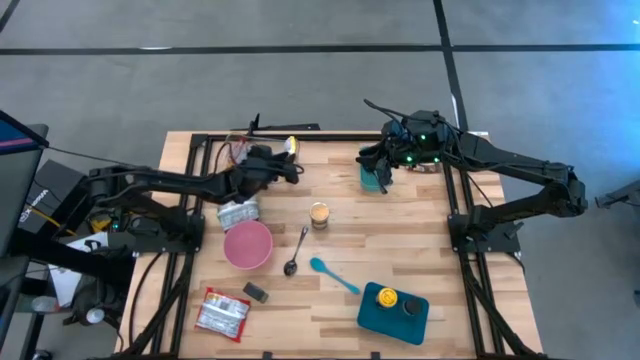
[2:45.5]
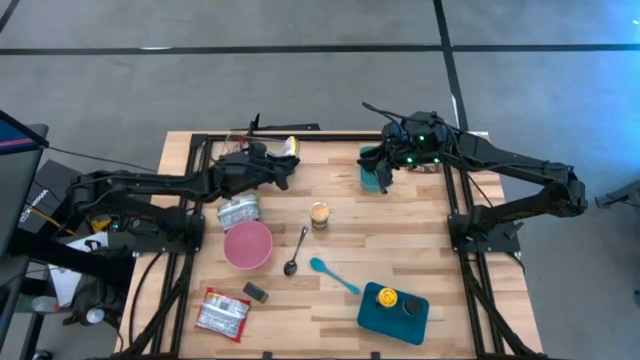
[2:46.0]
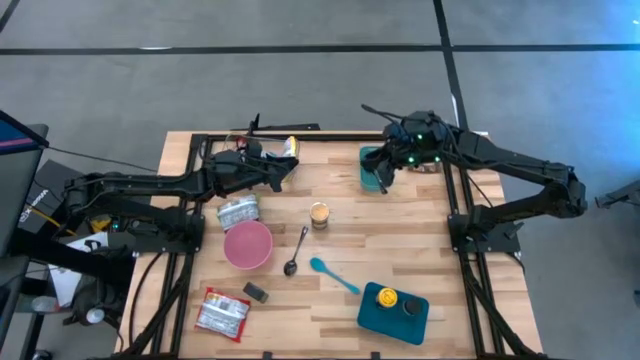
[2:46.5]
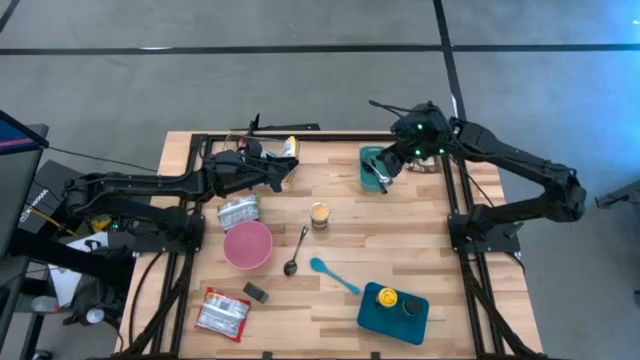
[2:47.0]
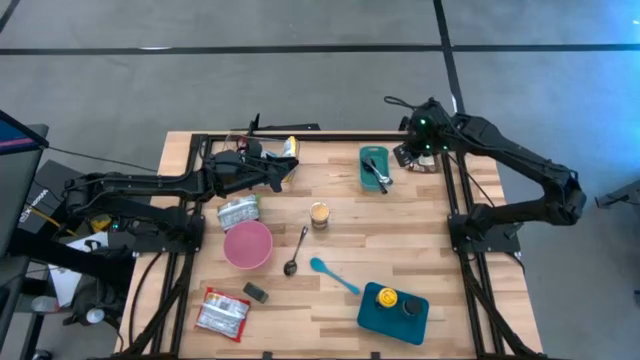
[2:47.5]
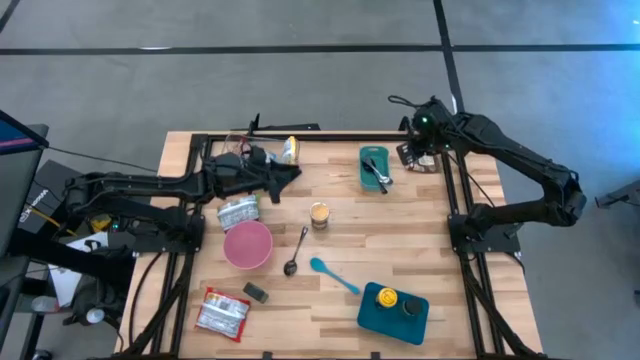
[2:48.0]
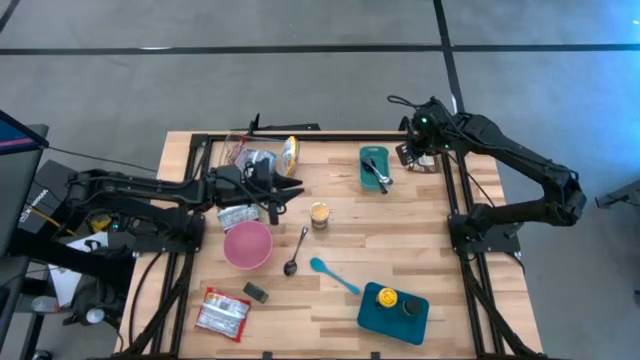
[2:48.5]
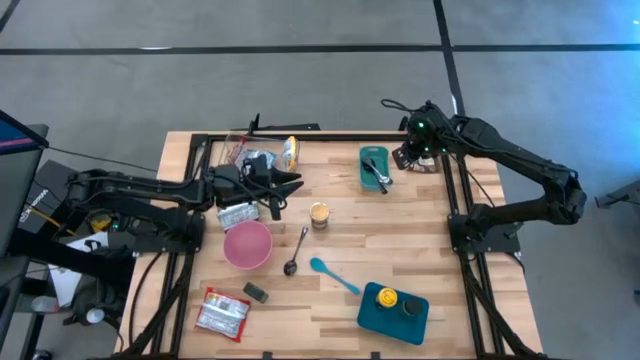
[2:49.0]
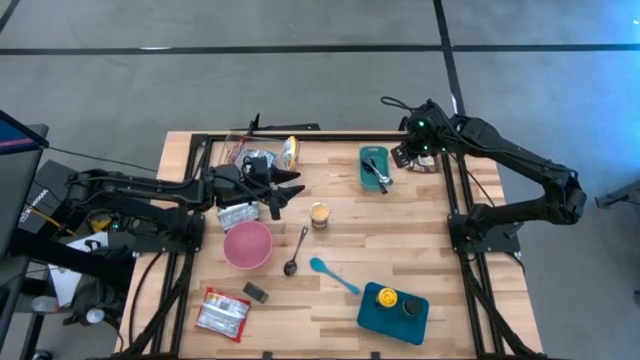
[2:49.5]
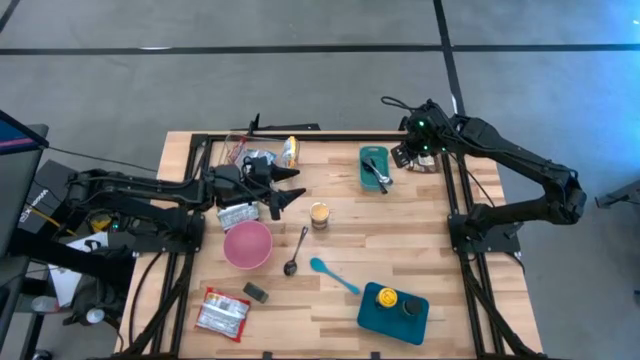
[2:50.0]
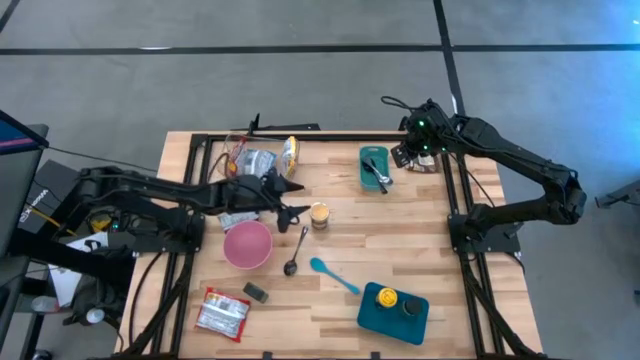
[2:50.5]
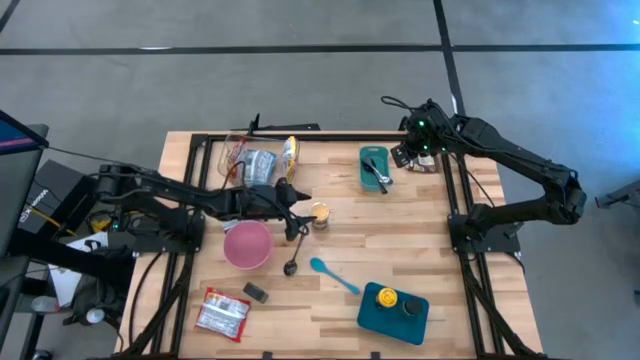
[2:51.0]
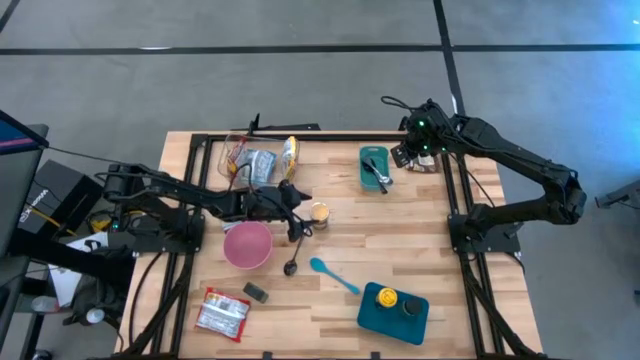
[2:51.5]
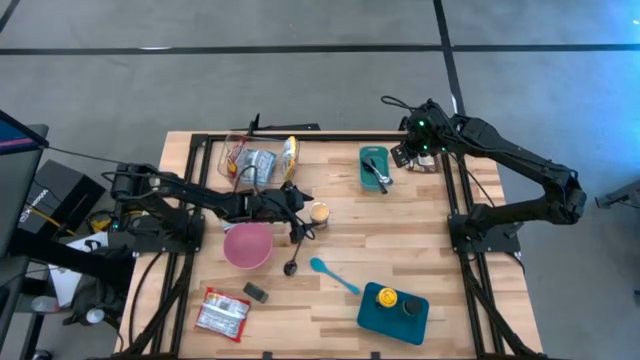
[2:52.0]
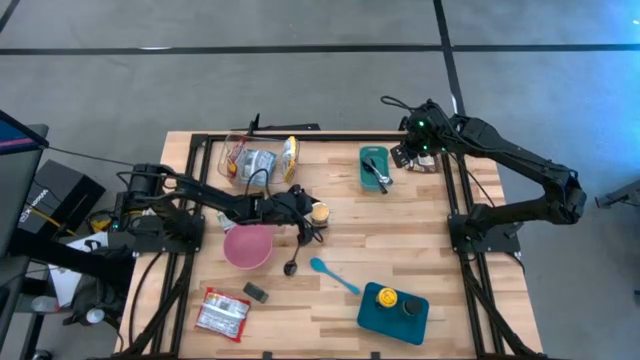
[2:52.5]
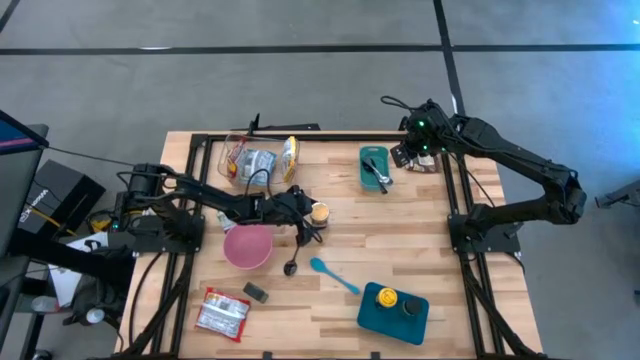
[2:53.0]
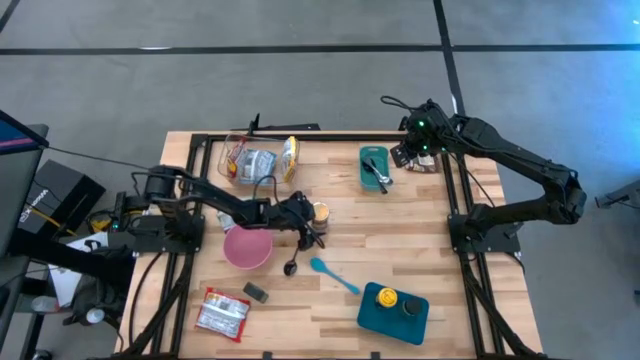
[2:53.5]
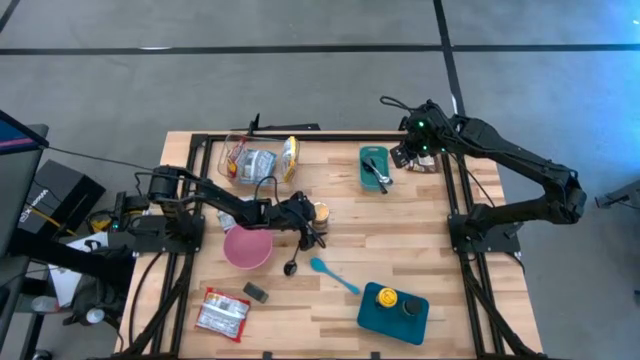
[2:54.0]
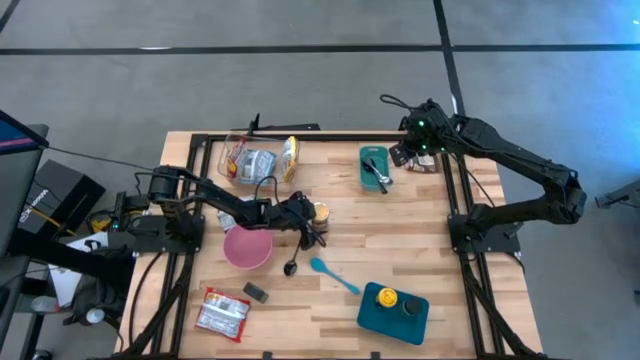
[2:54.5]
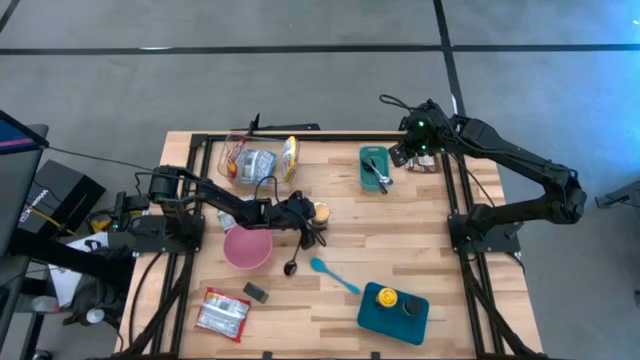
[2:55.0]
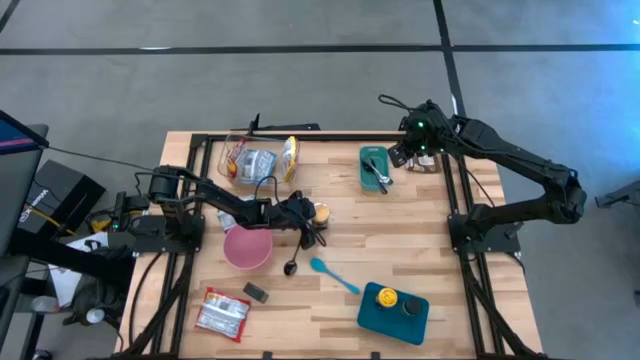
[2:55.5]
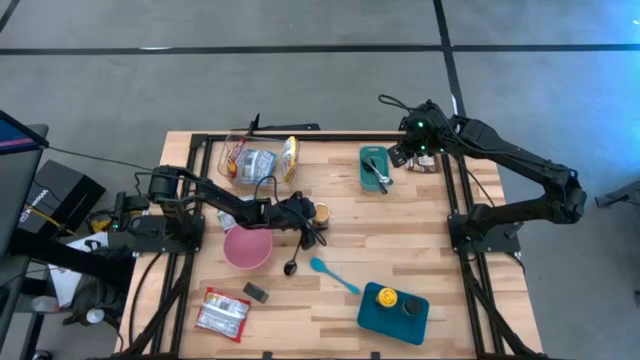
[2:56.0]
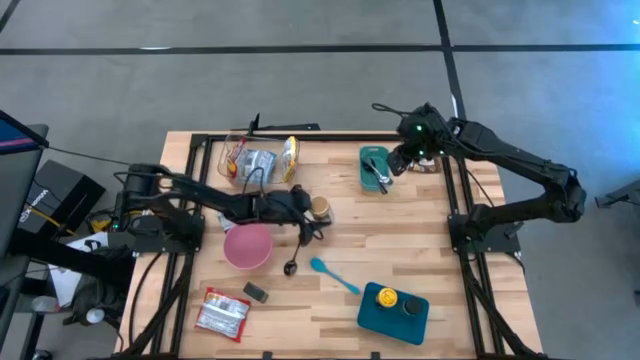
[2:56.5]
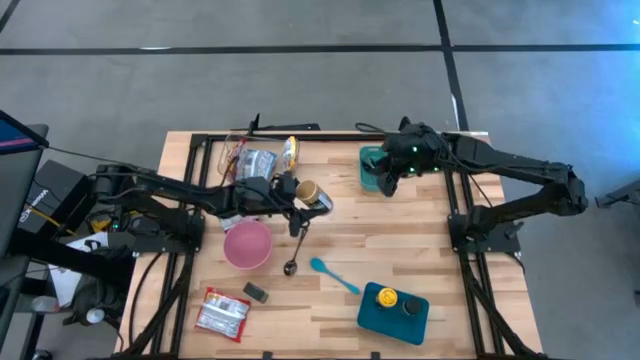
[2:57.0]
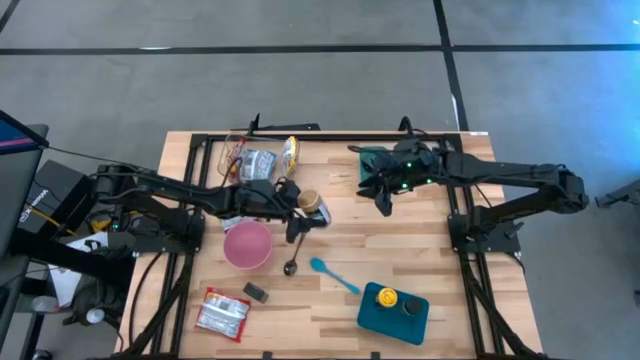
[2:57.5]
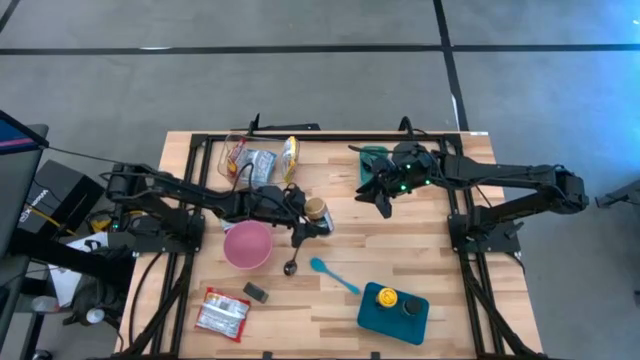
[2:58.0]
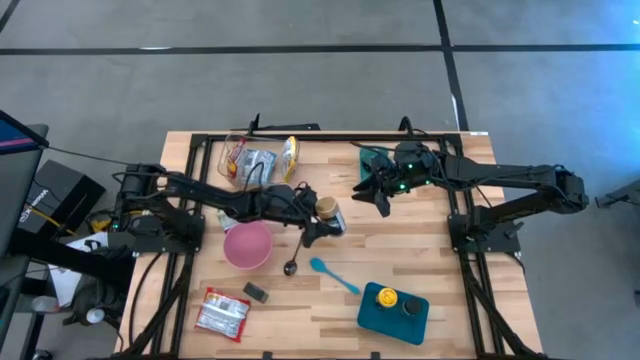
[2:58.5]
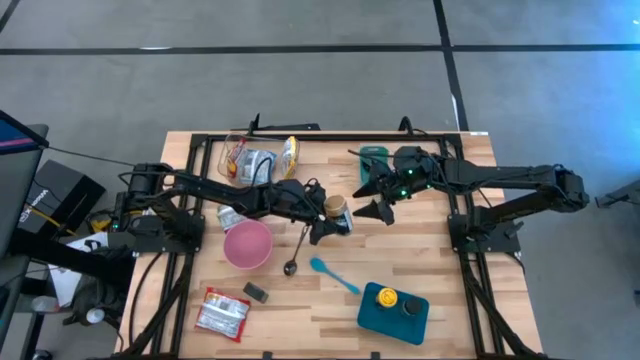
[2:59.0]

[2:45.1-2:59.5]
Task: Pick & Place Food Item
Put the gold seasoning bottle into the blue bin

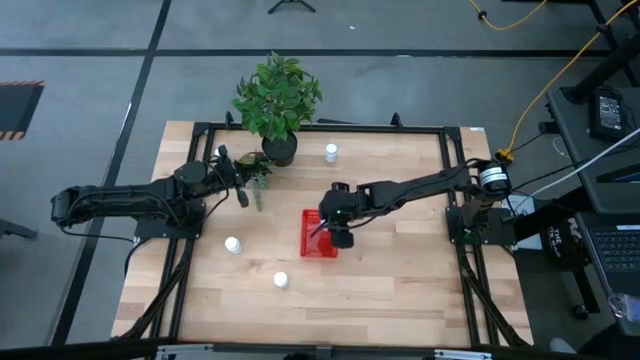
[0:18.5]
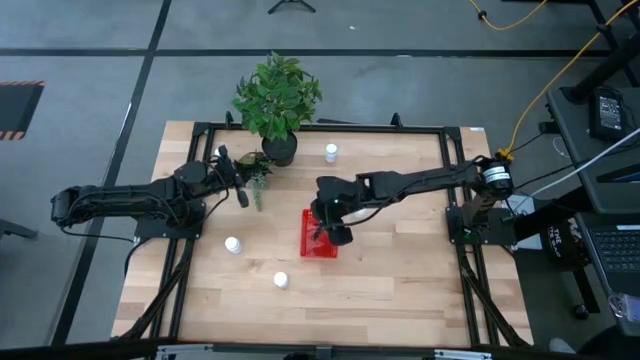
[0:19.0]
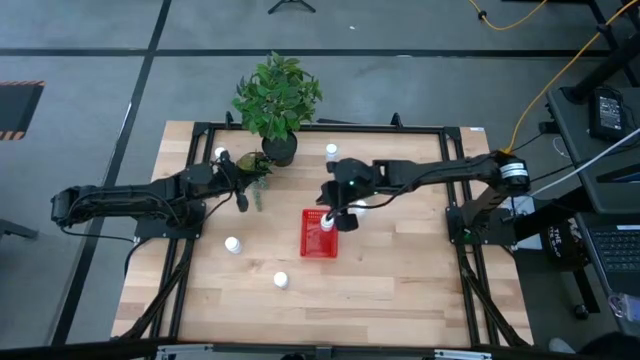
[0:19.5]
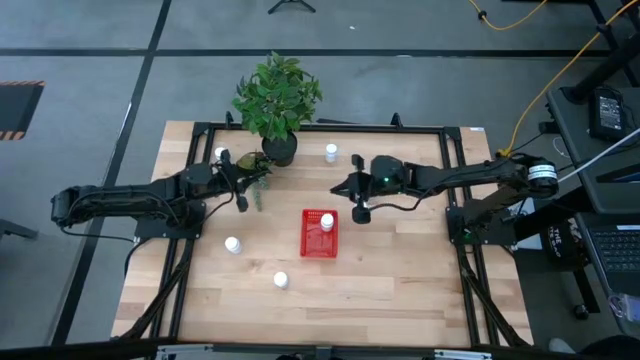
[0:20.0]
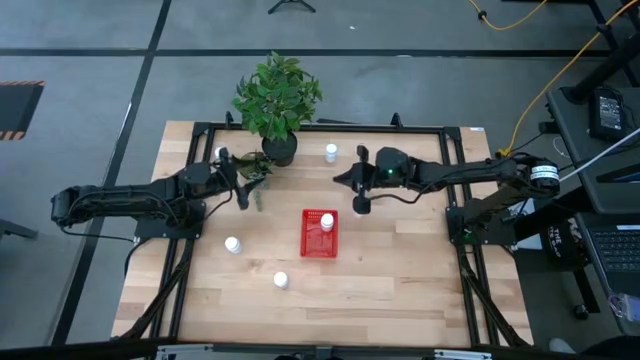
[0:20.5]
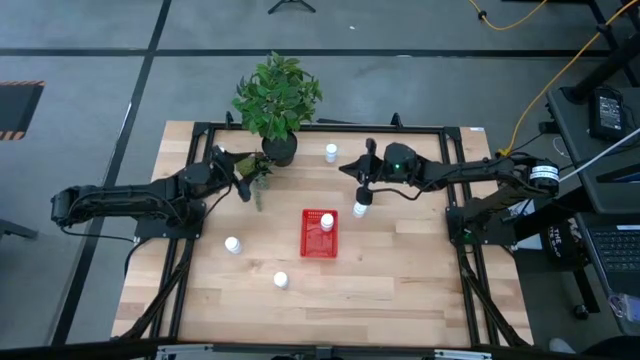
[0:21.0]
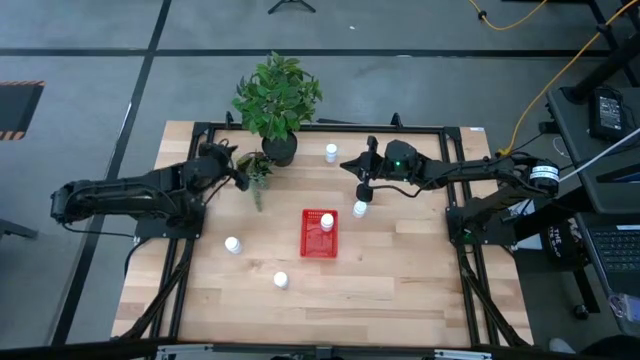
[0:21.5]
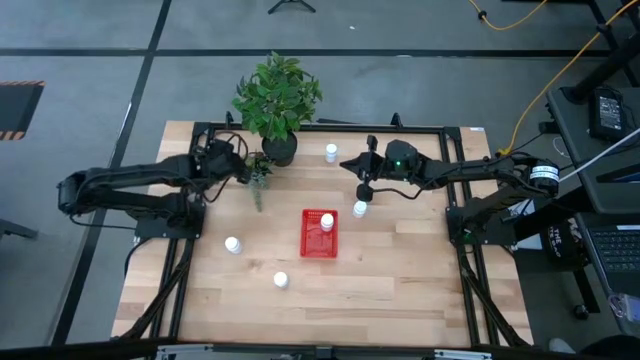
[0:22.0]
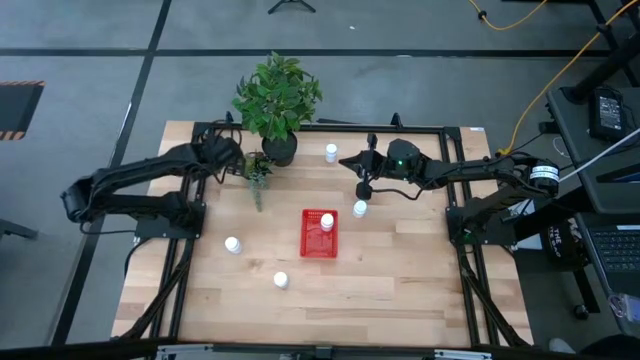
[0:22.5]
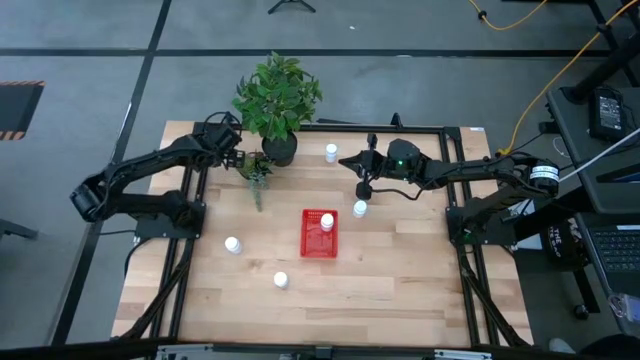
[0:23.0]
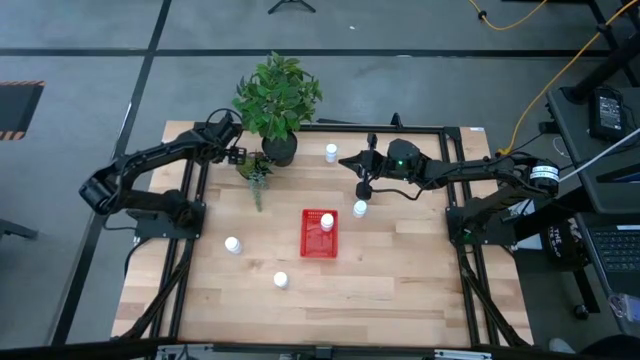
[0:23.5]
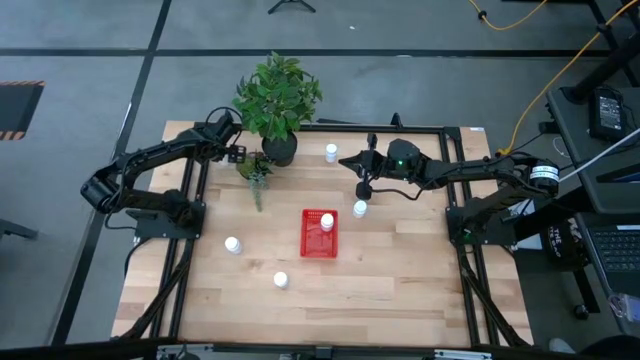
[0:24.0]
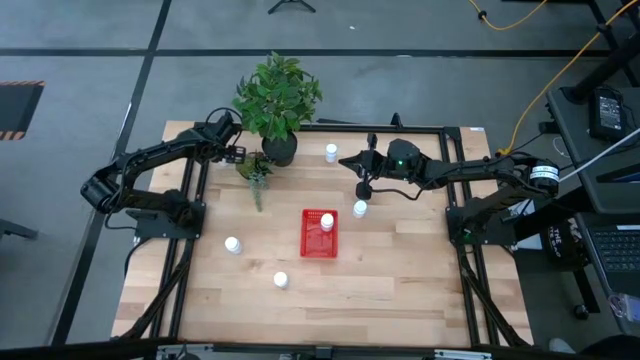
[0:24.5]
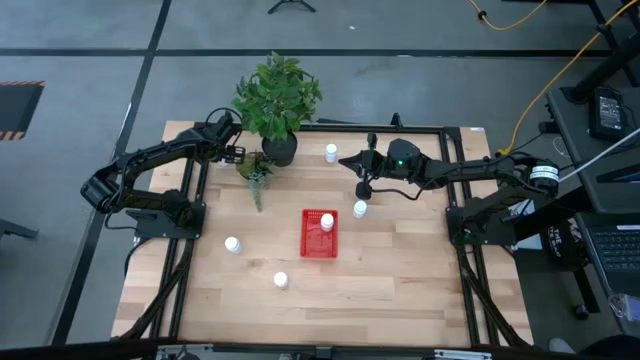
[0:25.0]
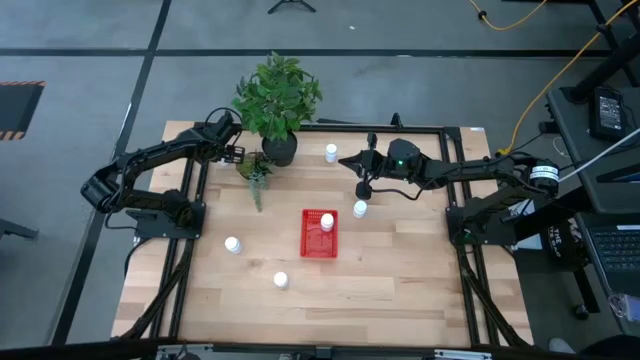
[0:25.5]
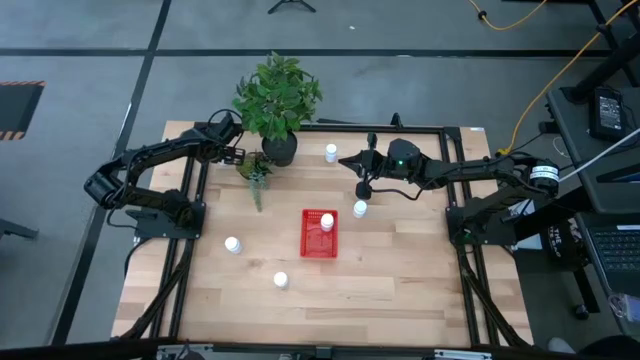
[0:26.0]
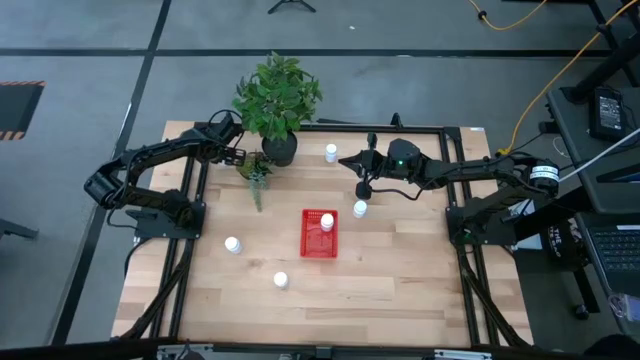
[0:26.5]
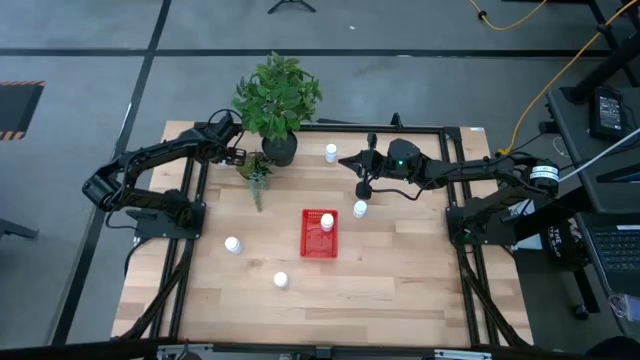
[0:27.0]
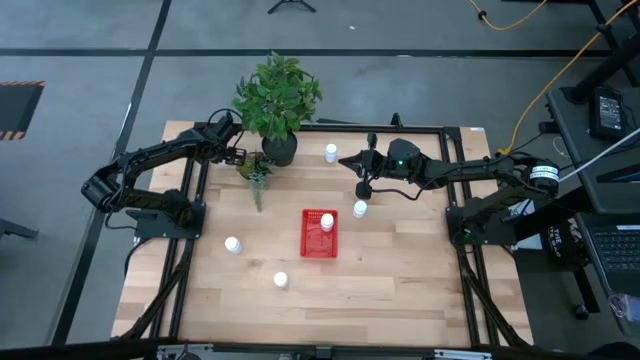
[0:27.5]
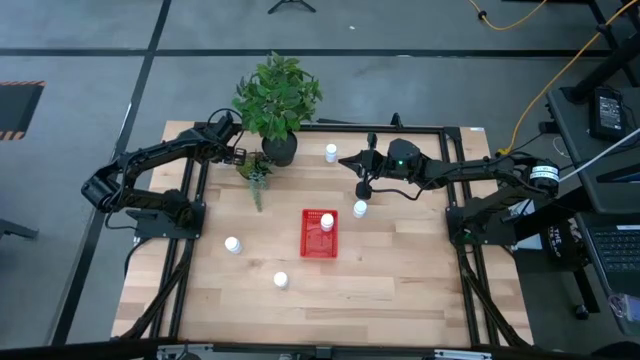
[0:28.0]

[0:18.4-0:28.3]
Task: Pick and place pill bottles into a basket
Put the white medicine bottle into the red bin
